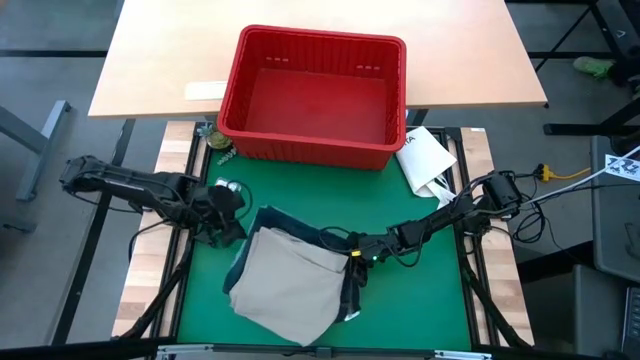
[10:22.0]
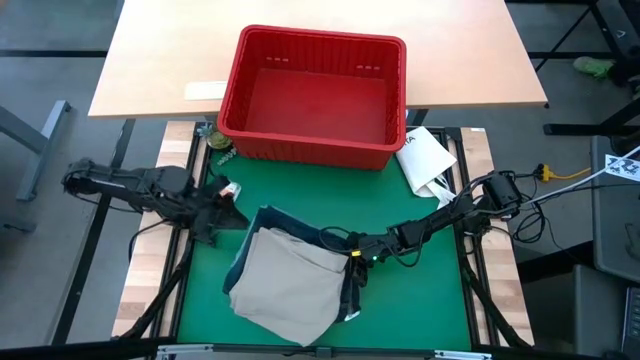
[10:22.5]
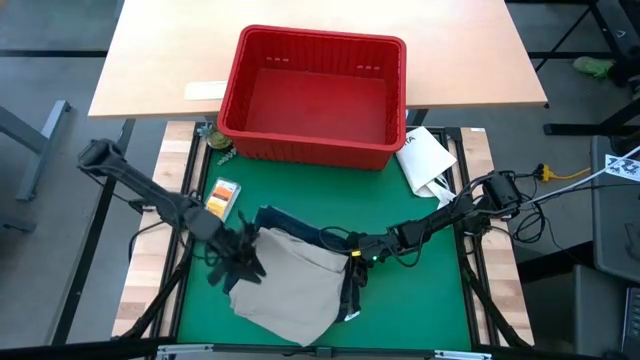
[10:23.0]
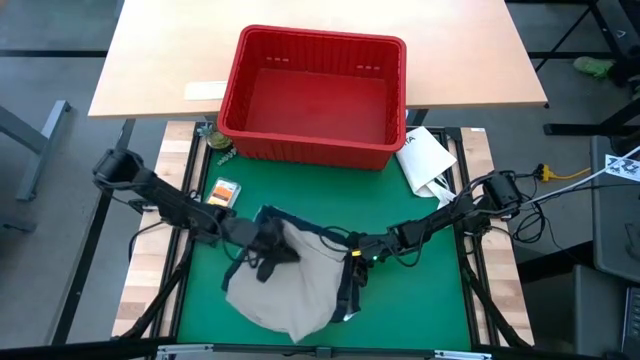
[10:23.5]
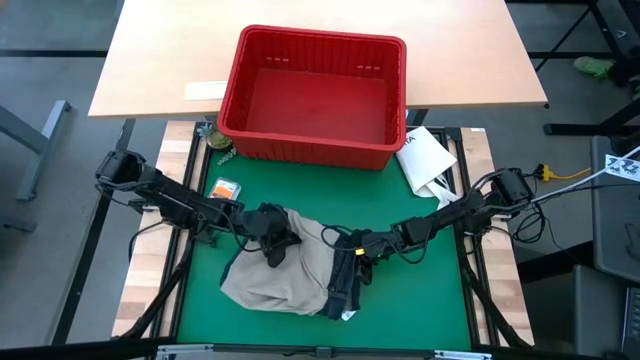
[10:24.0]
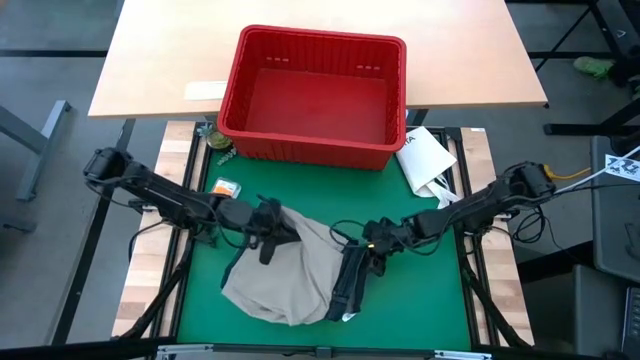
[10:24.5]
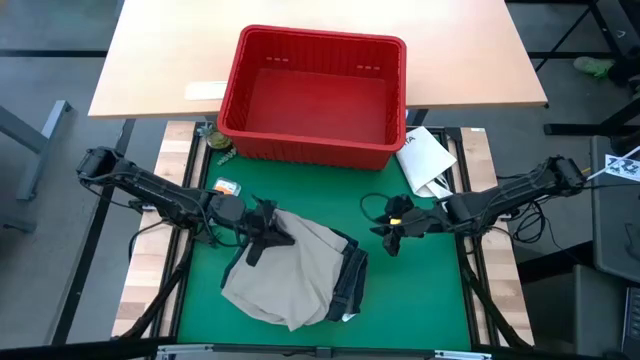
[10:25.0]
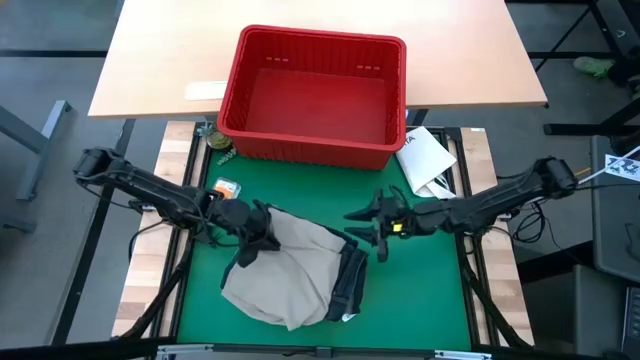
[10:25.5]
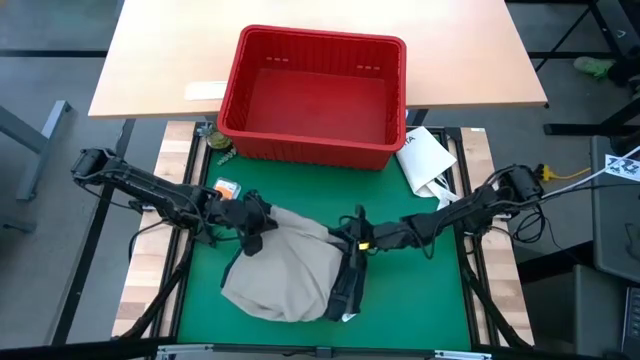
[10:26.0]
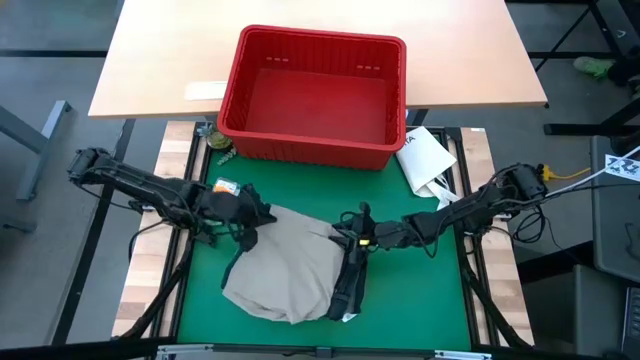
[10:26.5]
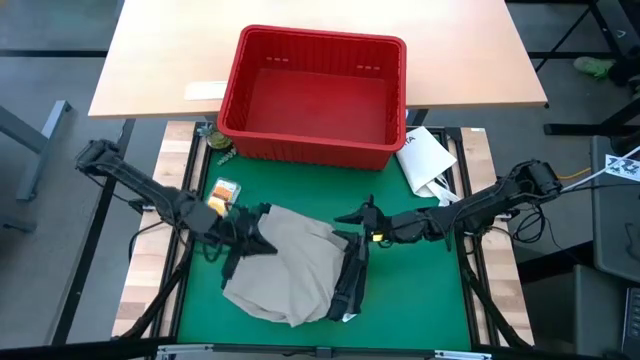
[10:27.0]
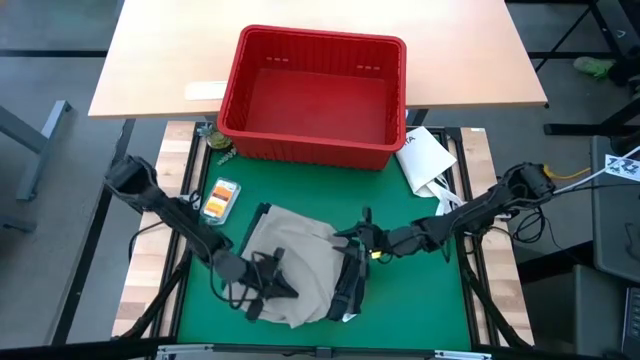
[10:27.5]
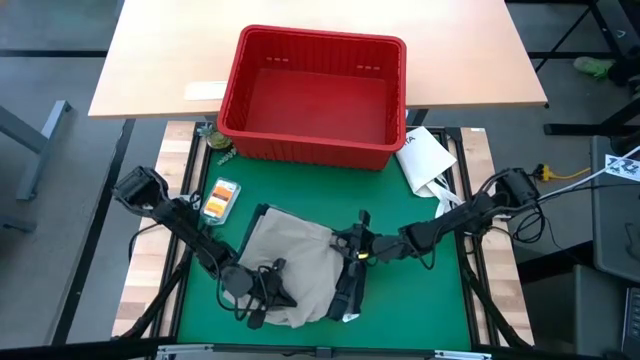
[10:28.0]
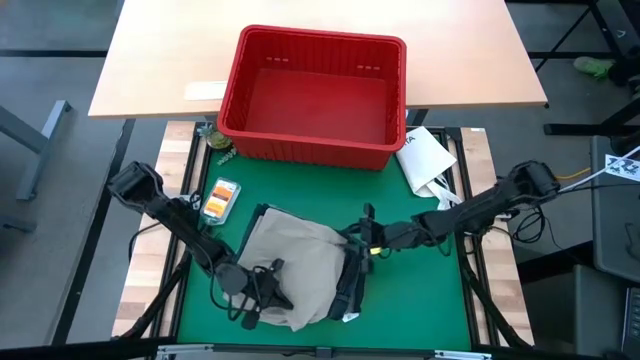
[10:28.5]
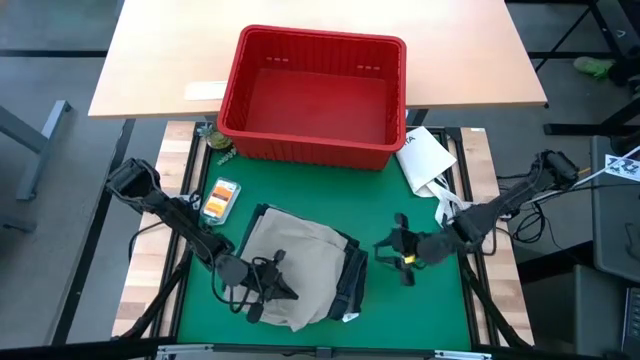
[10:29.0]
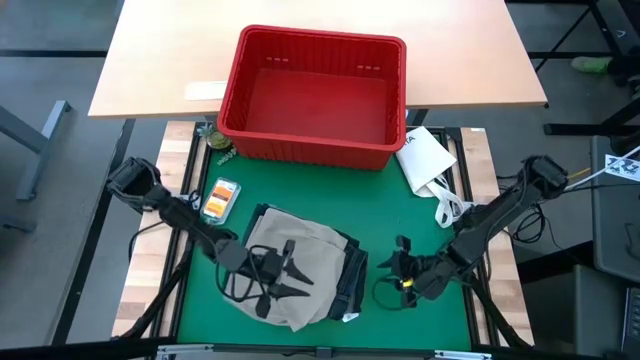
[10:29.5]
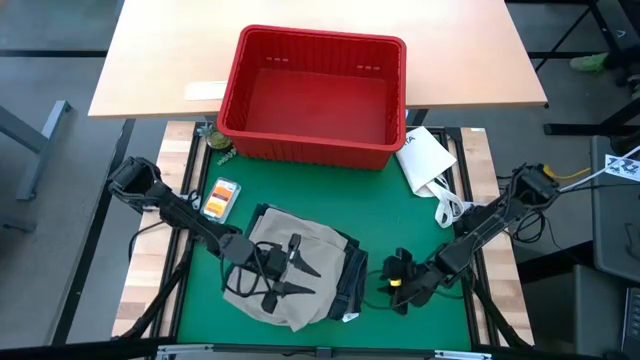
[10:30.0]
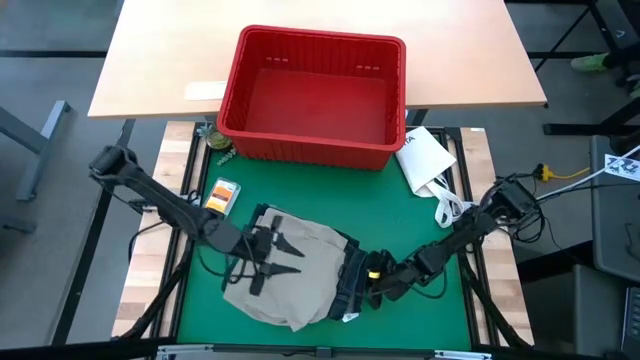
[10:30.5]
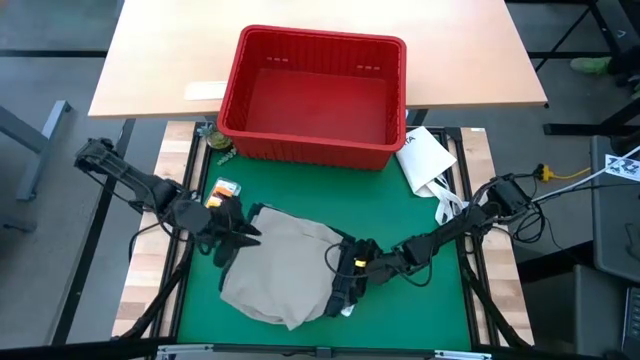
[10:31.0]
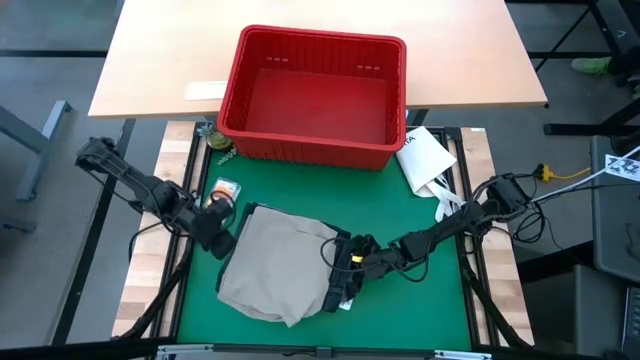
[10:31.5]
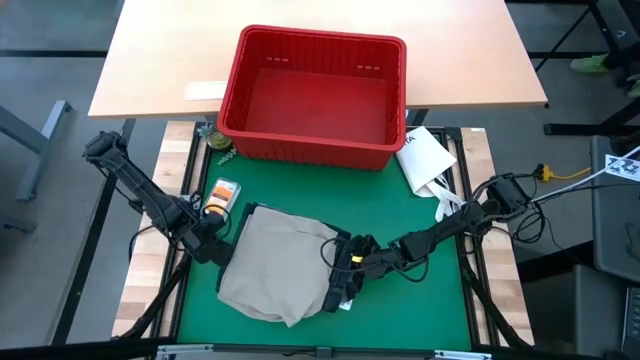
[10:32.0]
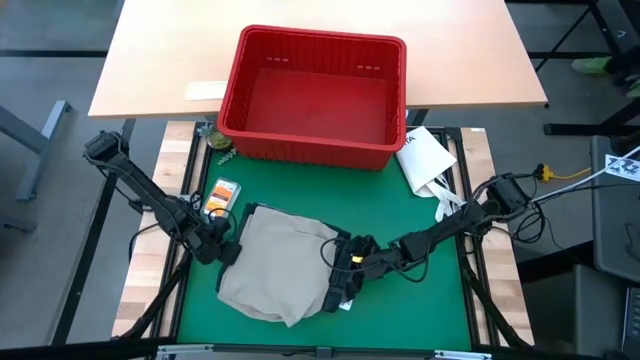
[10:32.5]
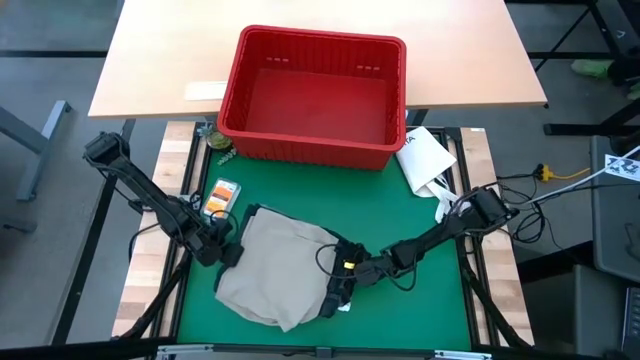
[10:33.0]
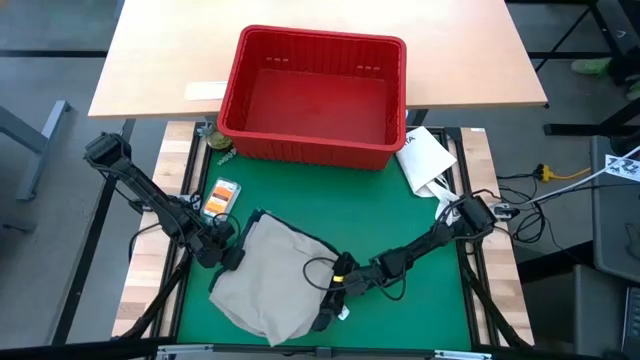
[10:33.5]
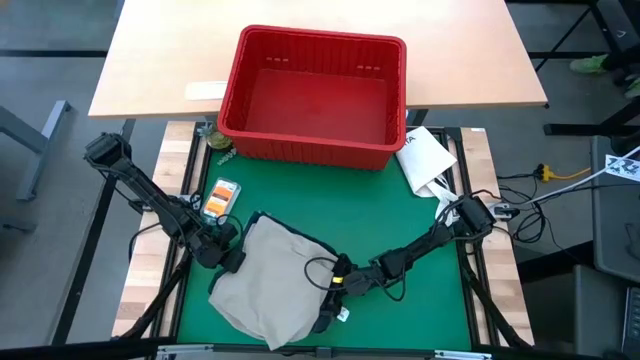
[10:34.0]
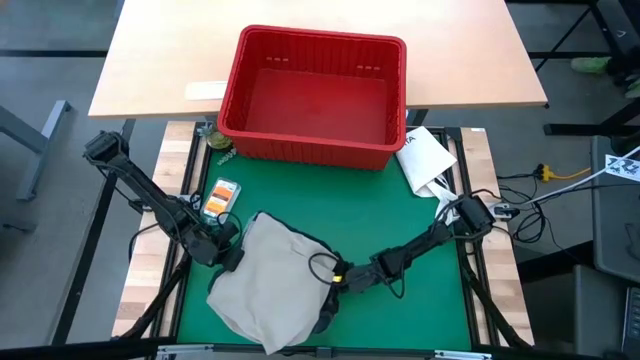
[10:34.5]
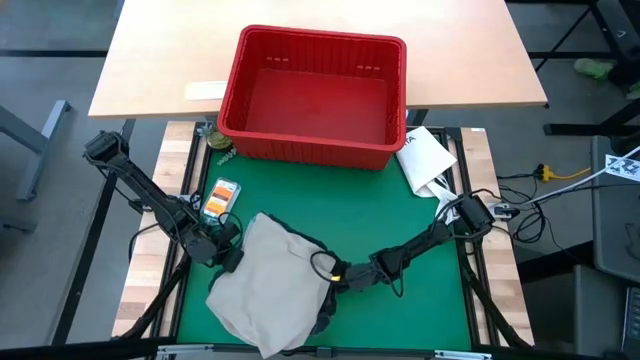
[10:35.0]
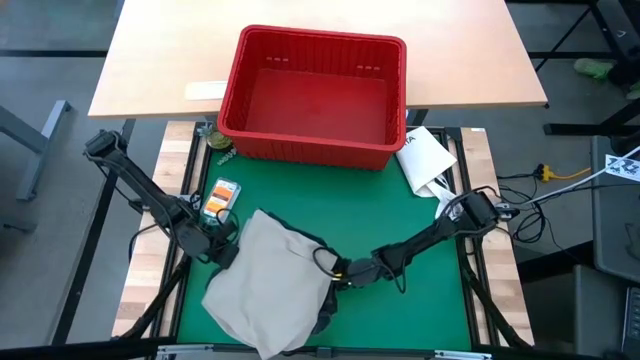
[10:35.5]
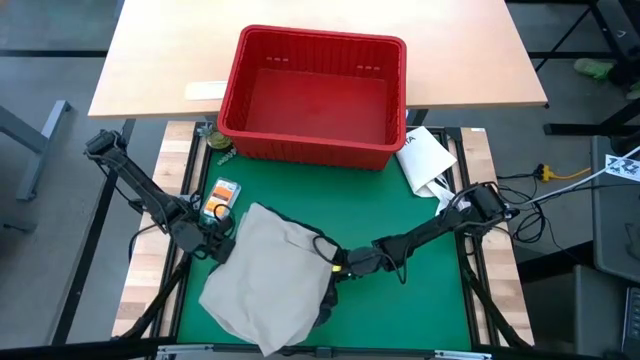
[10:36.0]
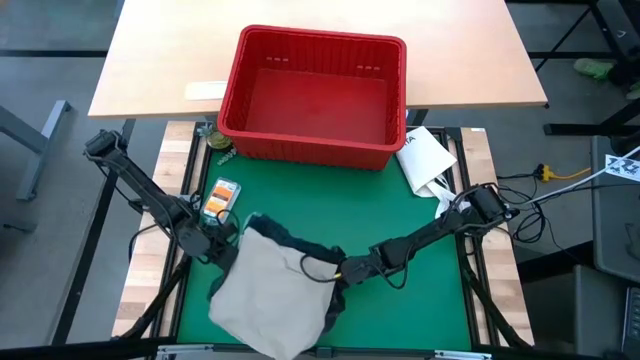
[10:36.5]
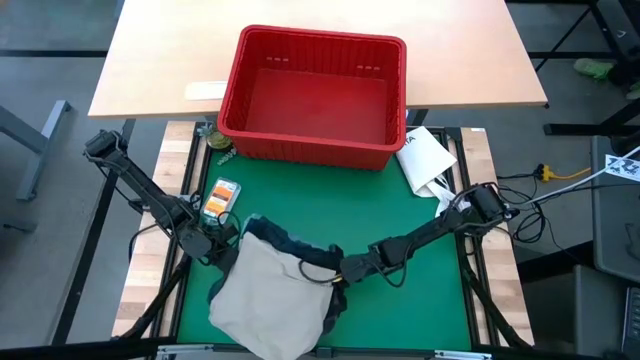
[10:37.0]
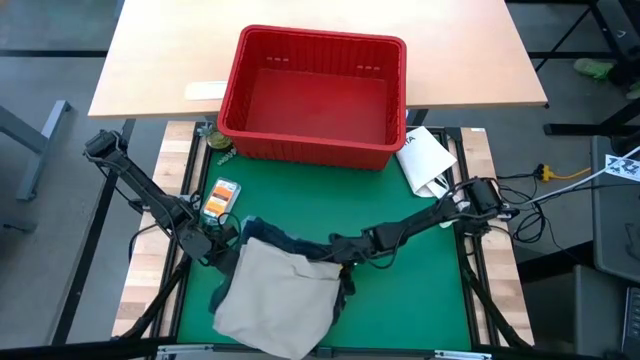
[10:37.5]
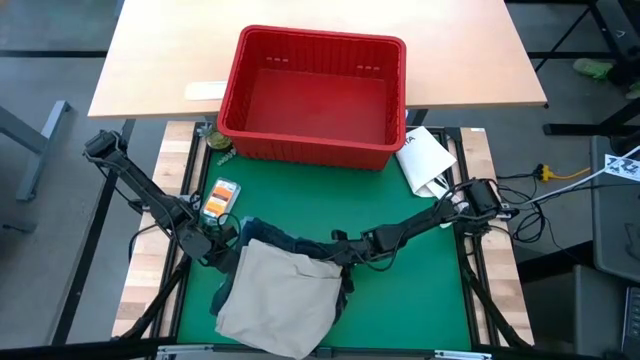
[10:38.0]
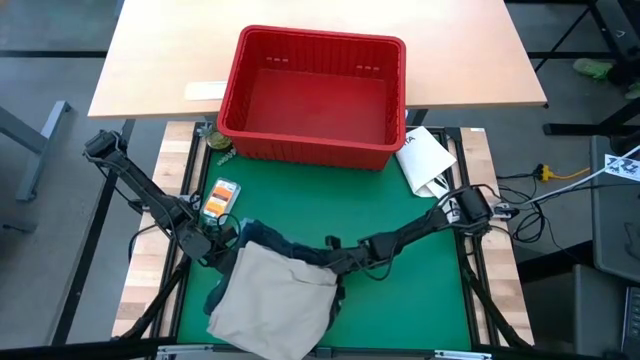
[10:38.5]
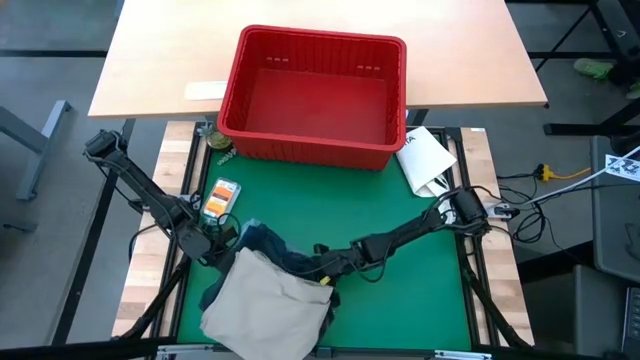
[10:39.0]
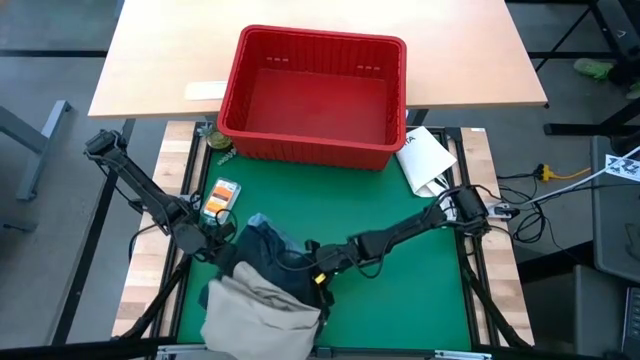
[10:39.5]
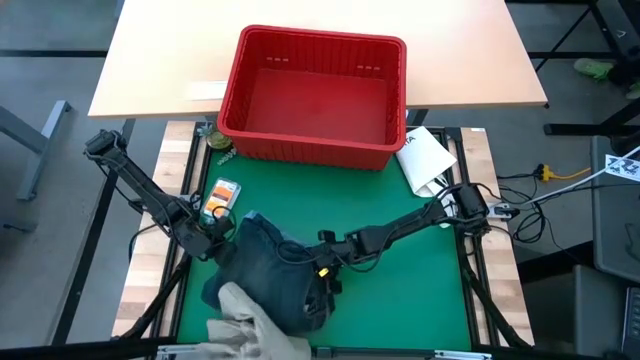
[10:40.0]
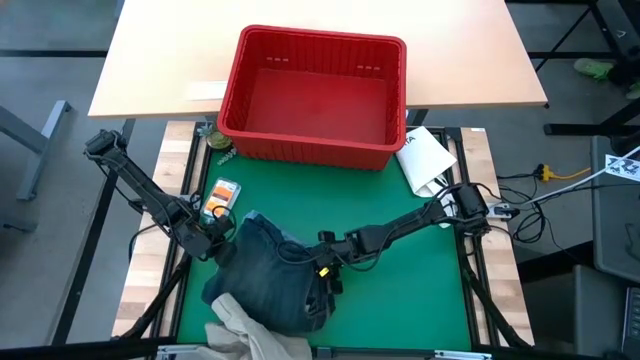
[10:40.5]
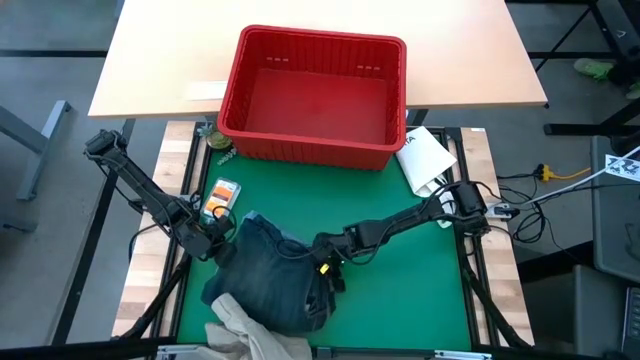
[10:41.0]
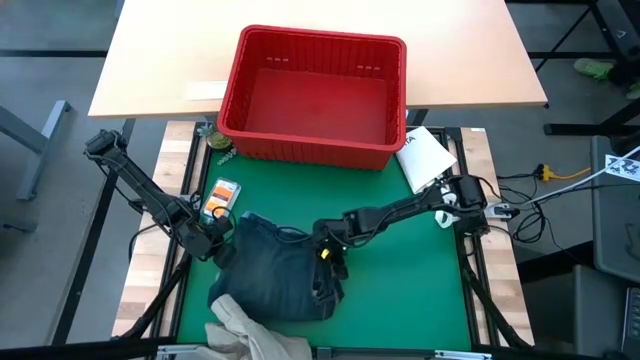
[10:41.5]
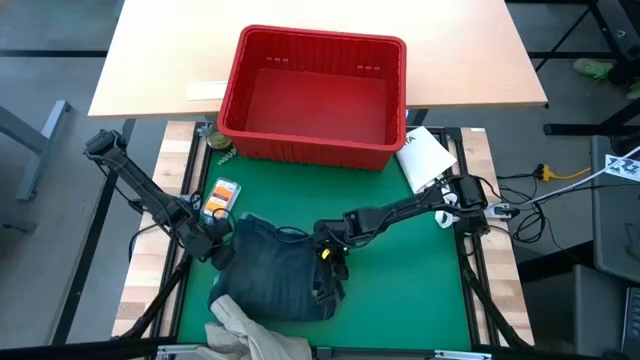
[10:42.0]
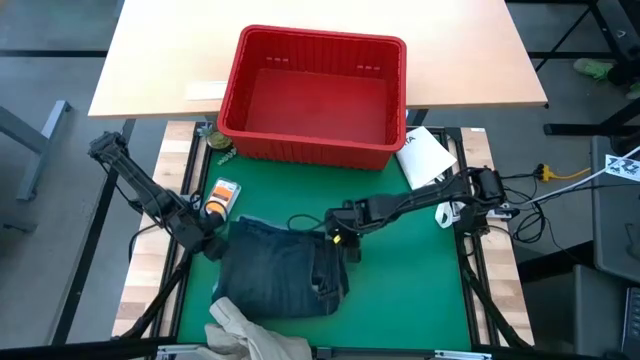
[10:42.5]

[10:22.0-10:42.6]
Task: Fold Laundry from Bin
Put the stacked of clothes into red bin
